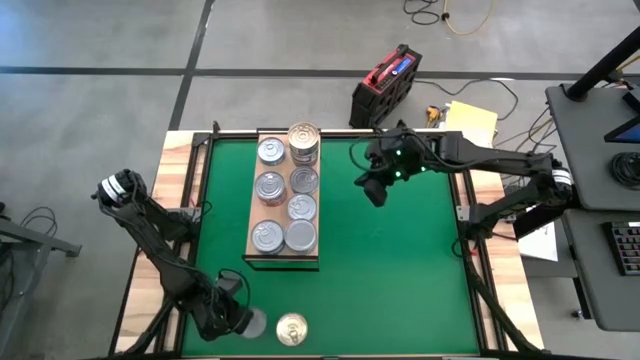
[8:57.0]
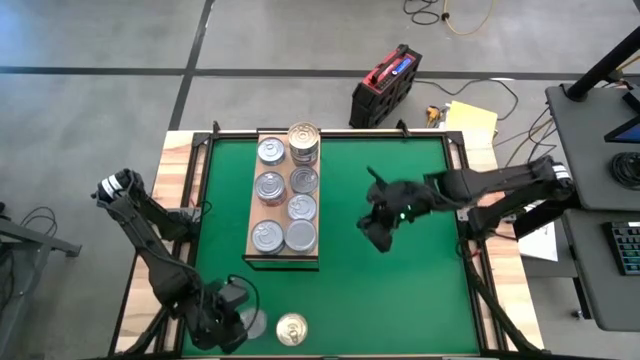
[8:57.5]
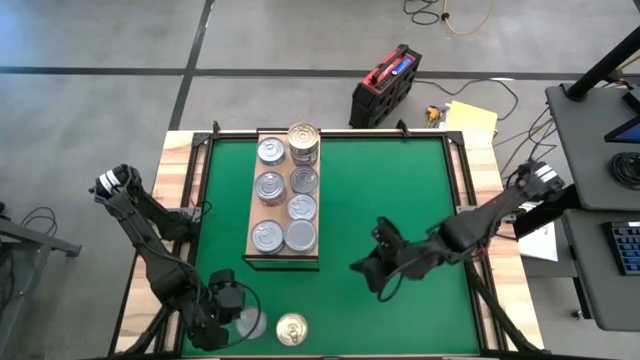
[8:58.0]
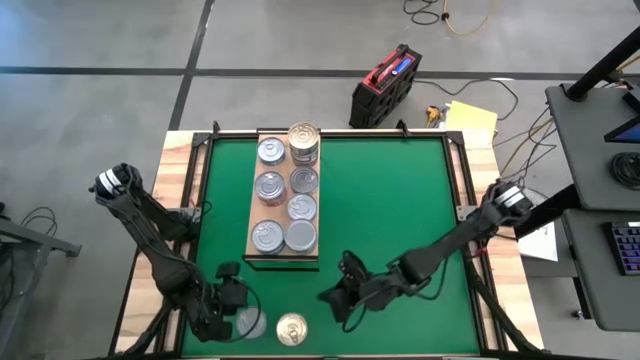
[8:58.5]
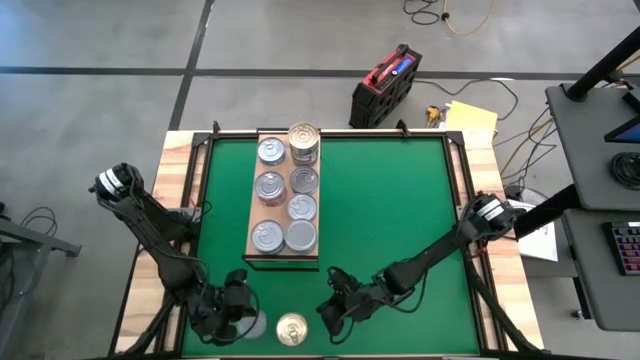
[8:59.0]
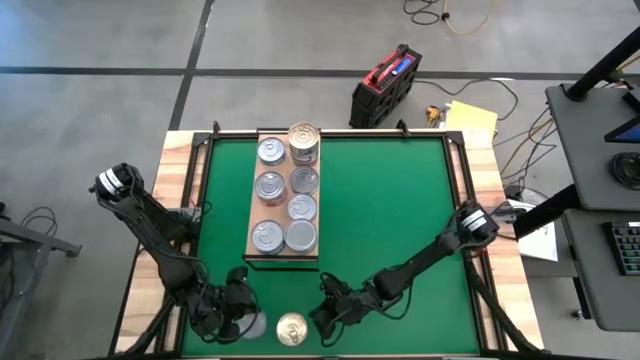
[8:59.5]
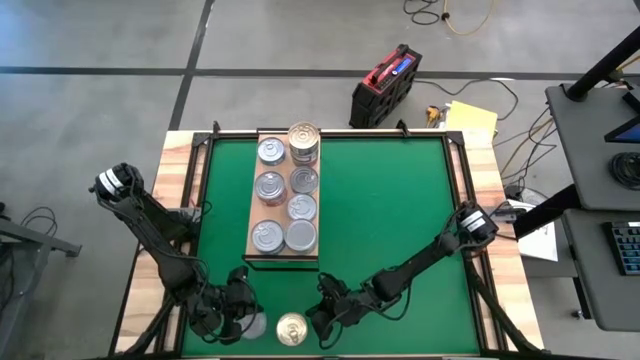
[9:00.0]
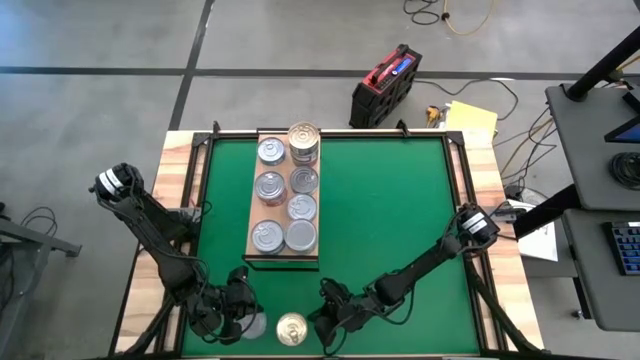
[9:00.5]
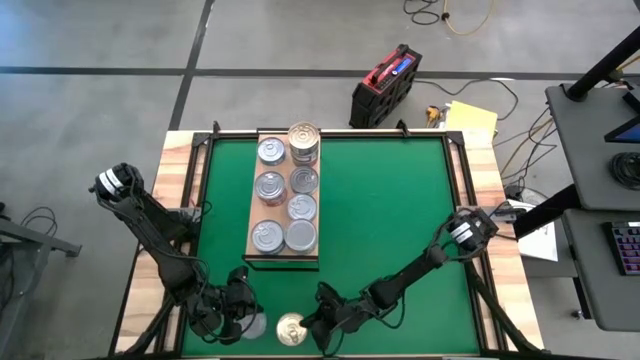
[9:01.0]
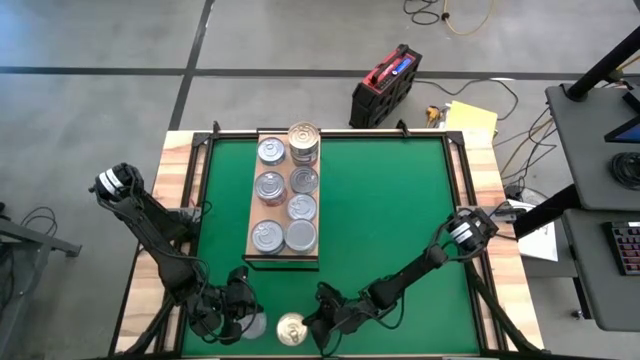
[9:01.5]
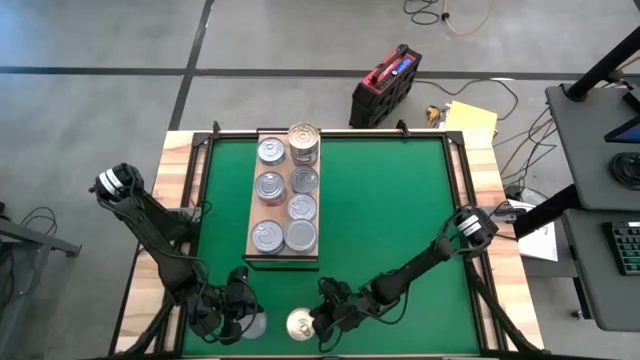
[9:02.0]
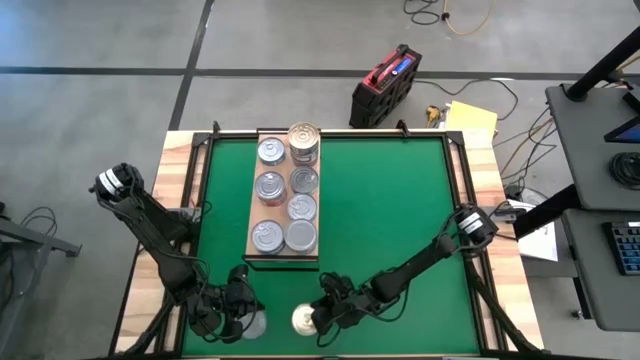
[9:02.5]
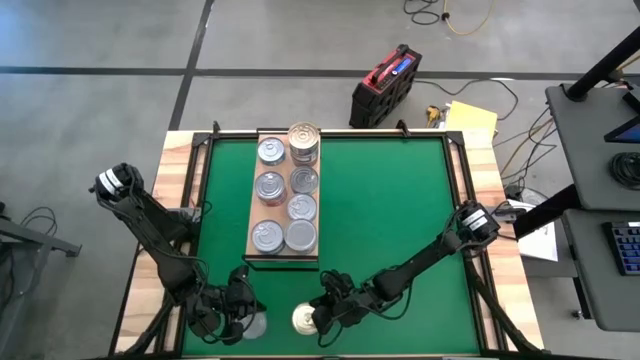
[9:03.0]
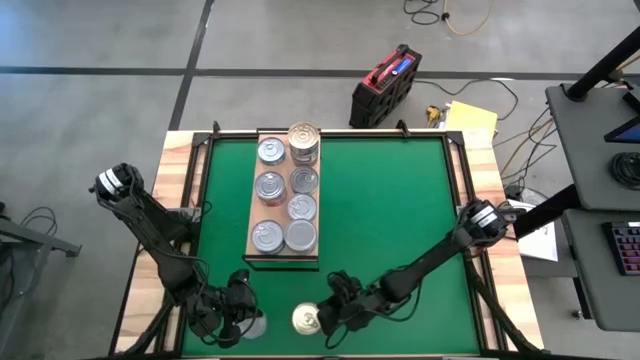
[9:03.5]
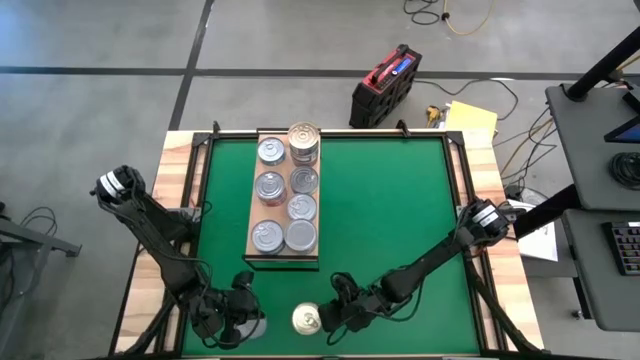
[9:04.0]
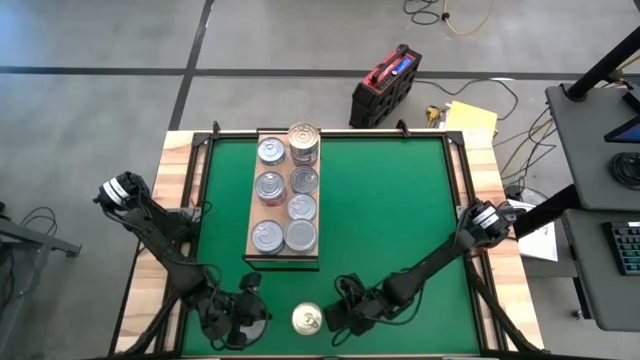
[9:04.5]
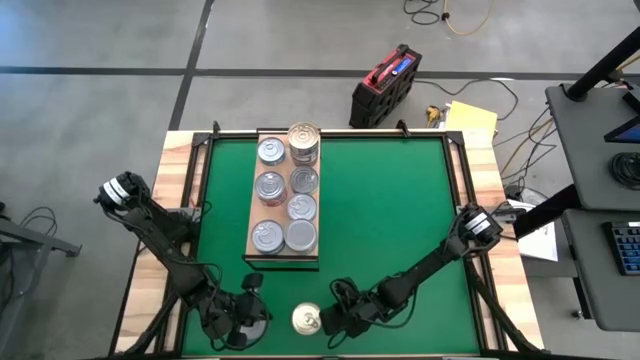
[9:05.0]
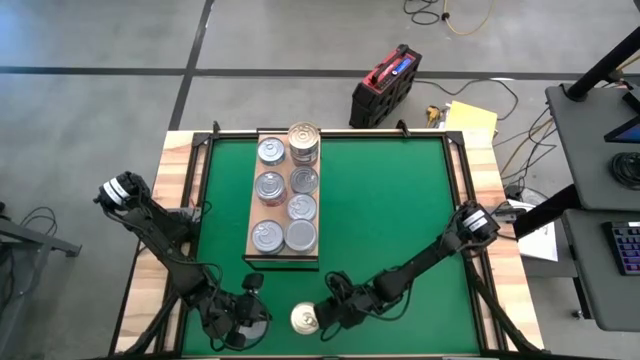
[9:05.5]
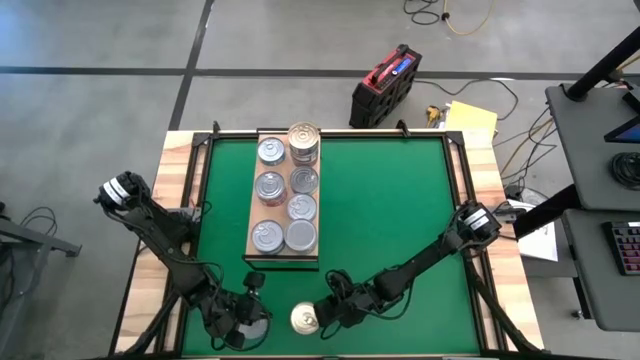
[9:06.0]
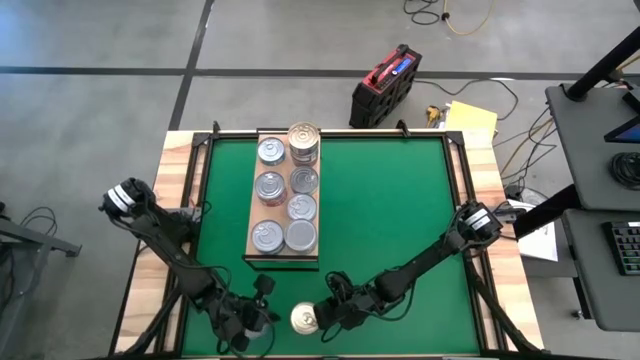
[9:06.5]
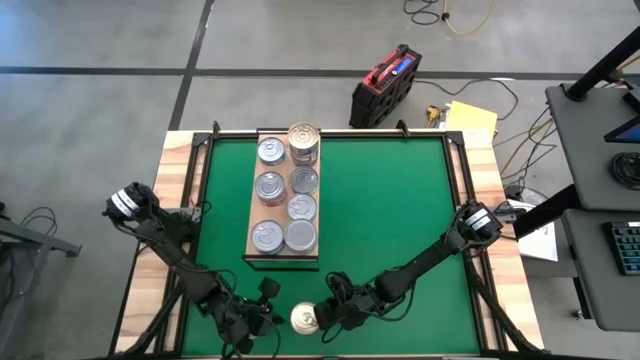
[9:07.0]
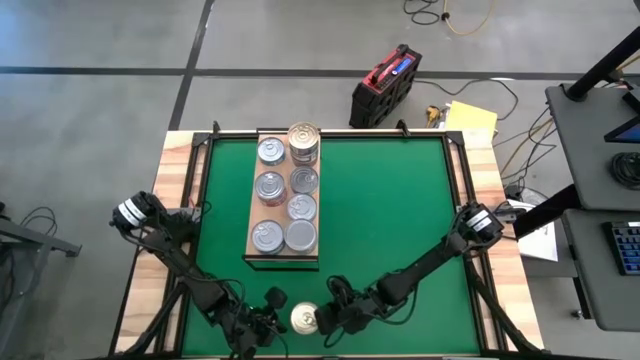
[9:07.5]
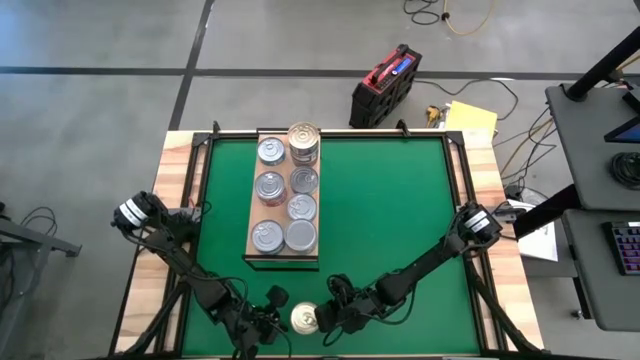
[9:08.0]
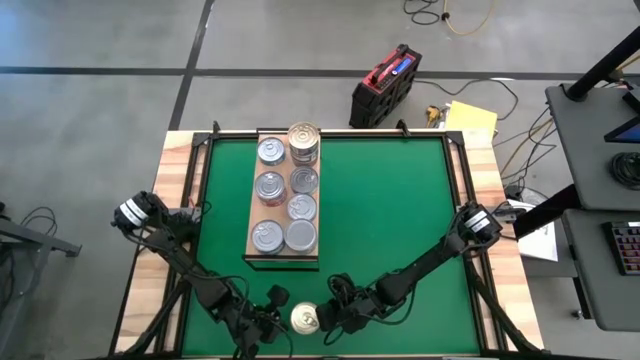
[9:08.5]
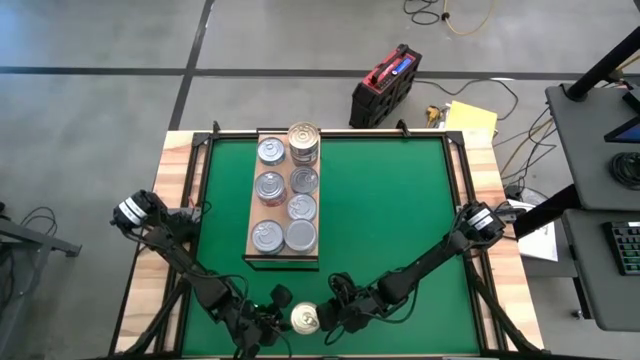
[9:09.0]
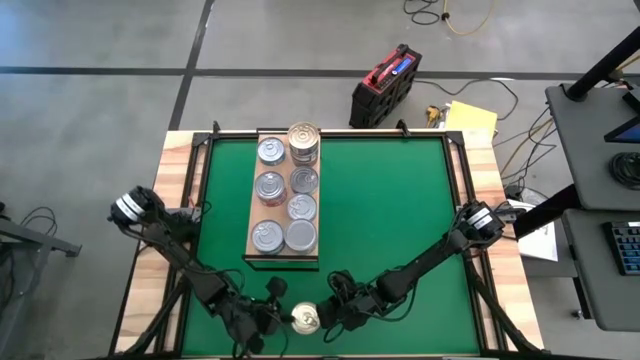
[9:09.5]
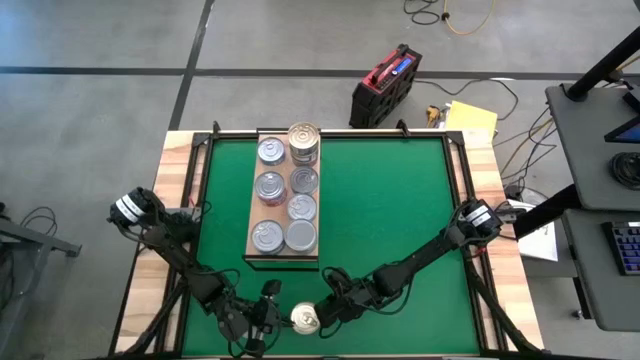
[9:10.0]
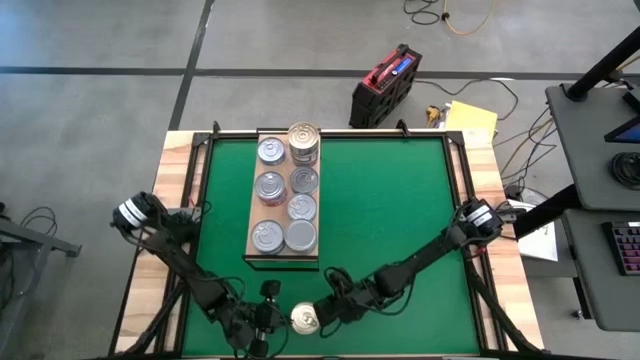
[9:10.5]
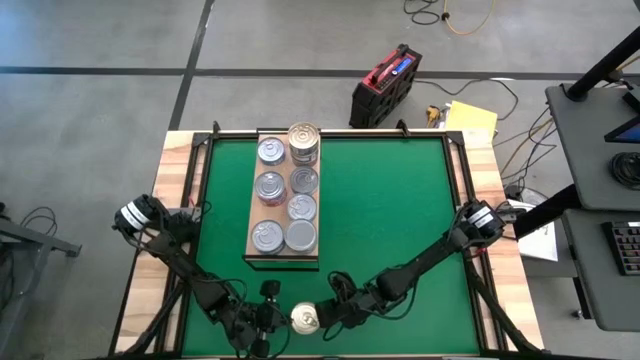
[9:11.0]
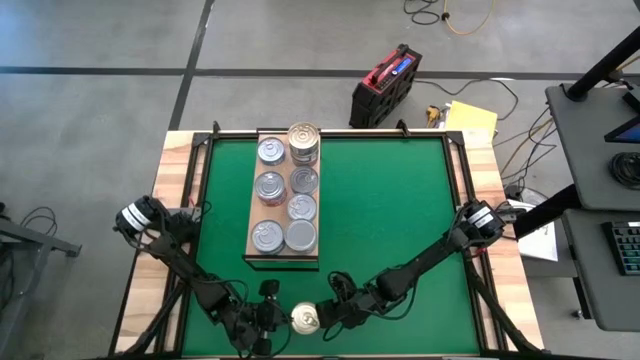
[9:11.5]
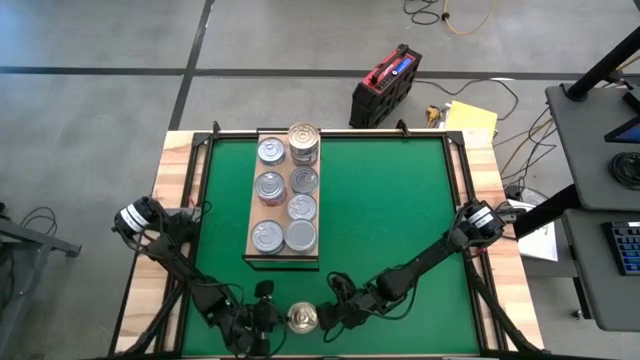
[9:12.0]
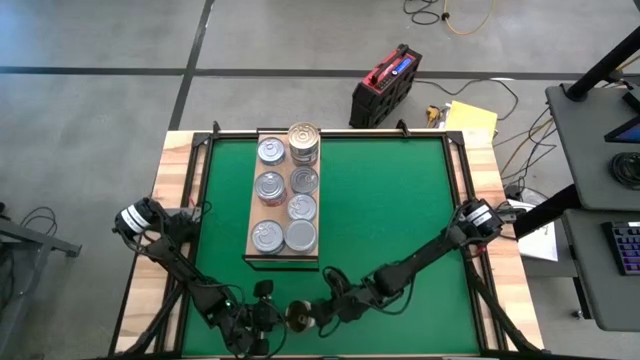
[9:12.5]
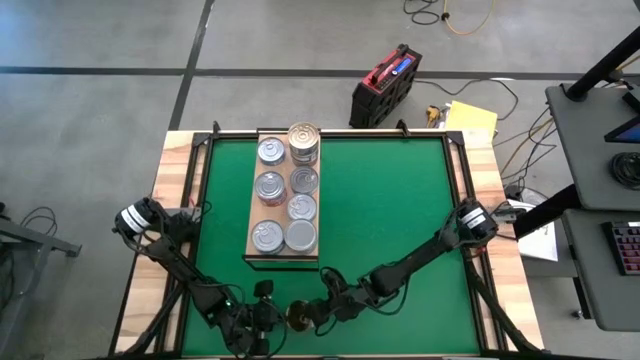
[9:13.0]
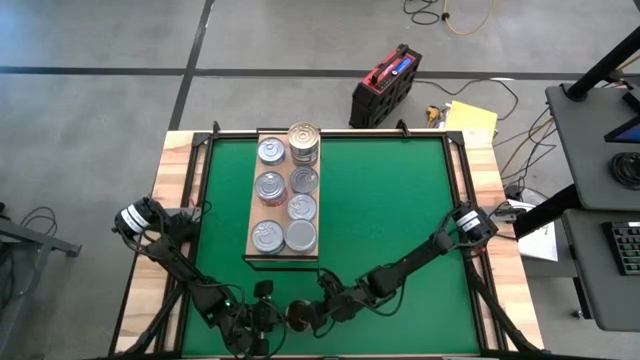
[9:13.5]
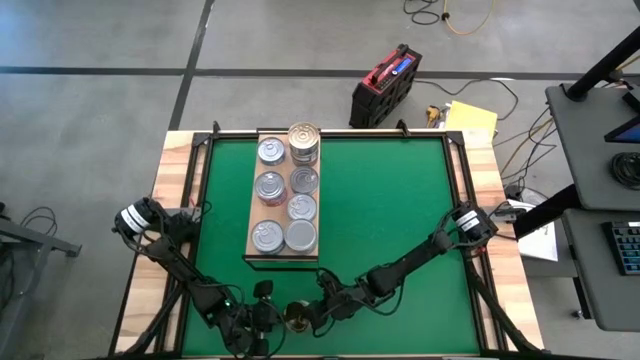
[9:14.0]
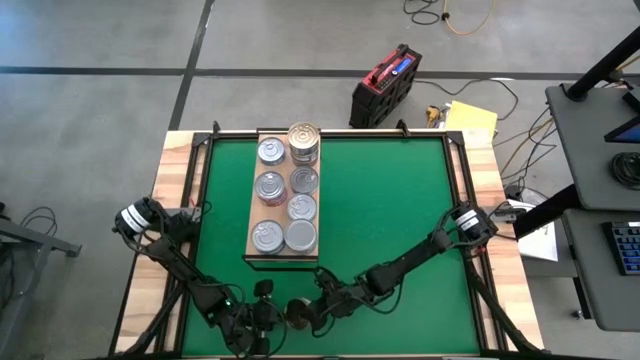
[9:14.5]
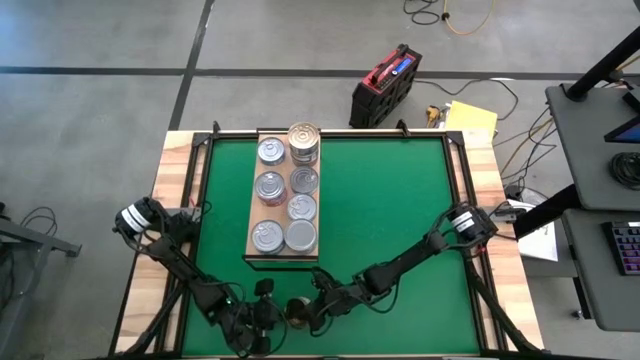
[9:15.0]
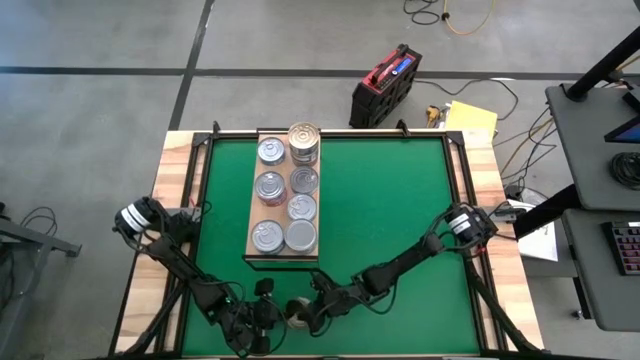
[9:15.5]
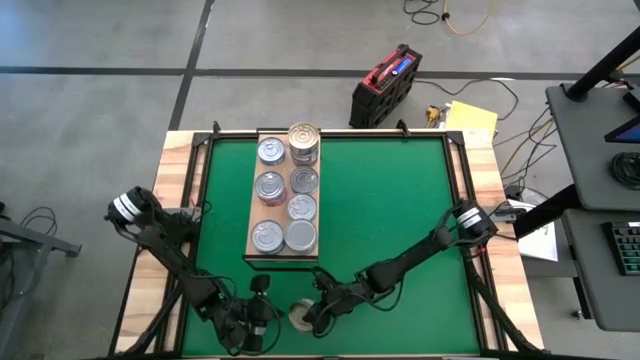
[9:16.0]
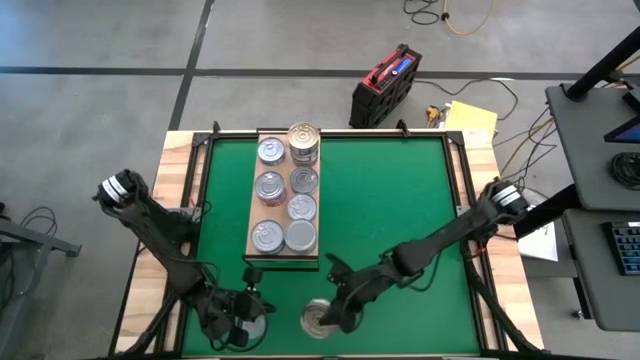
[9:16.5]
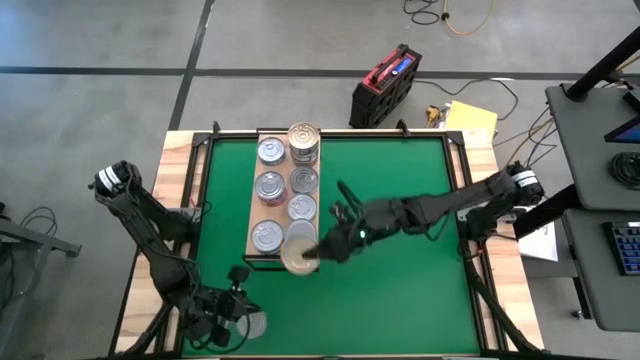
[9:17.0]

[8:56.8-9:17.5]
Task: Stack canned seafood by type on shelf
Stack the blue and pink tuna can on top of the blue and pink tuna cans on the shelf

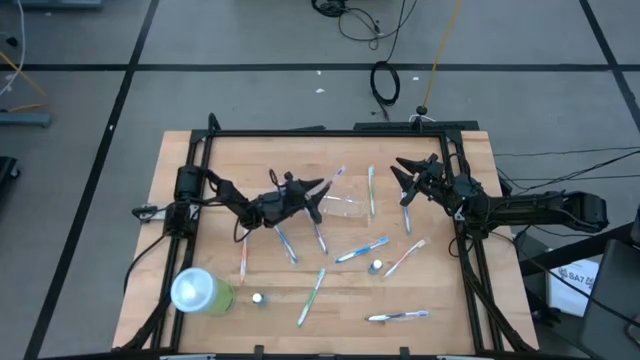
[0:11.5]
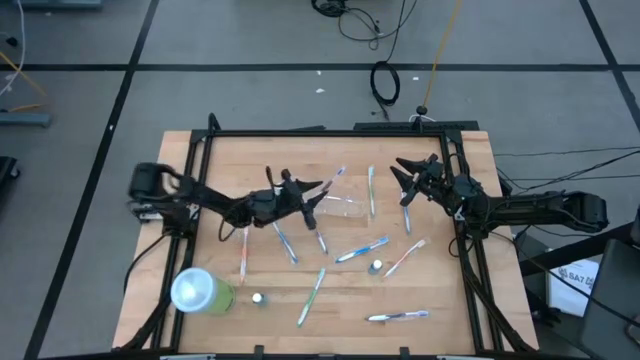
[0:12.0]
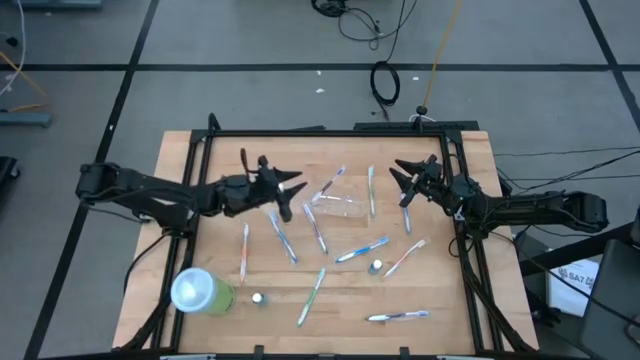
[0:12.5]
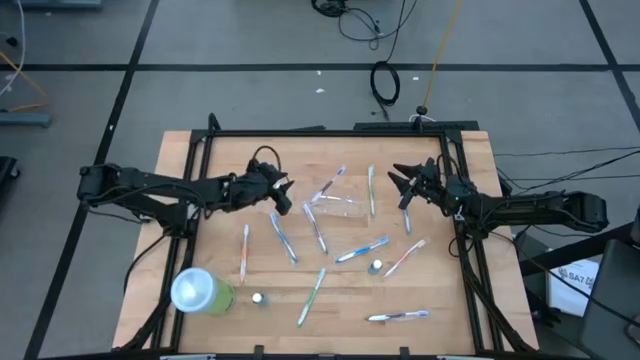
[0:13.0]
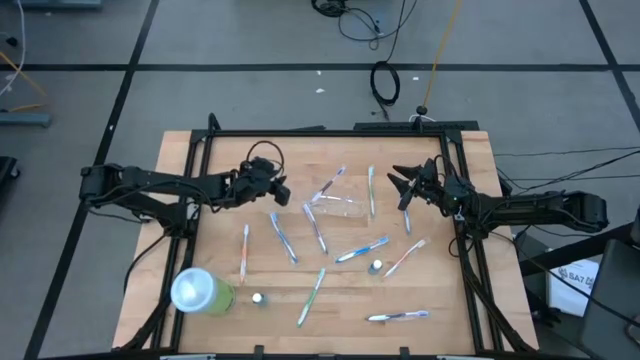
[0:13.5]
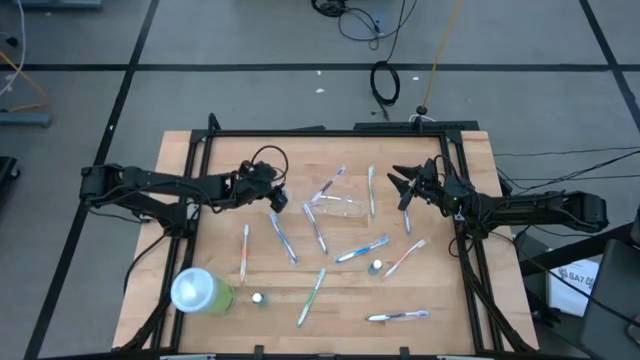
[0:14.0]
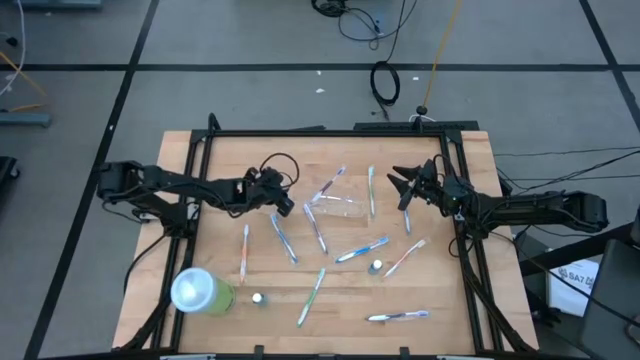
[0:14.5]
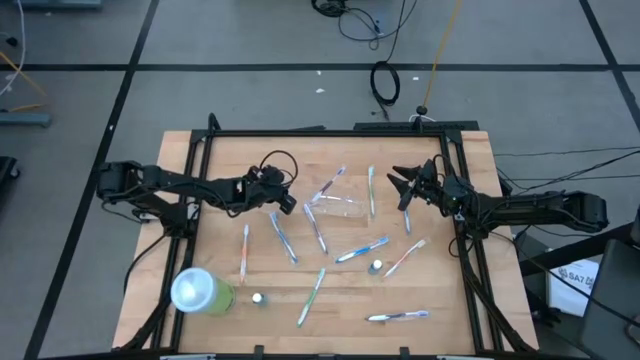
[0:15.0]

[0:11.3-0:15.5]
Task: Pick & Place toothbrushing station
Put the top mouthwash into the transparent organizer
